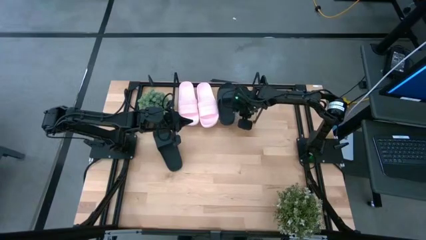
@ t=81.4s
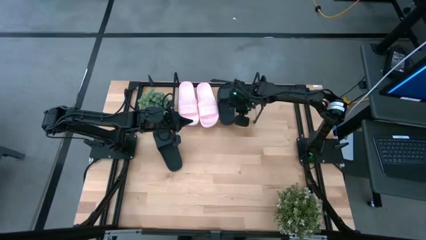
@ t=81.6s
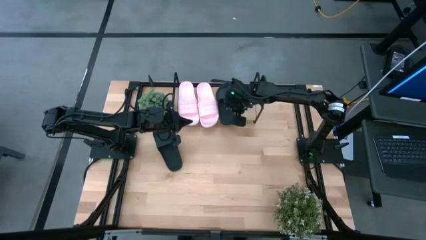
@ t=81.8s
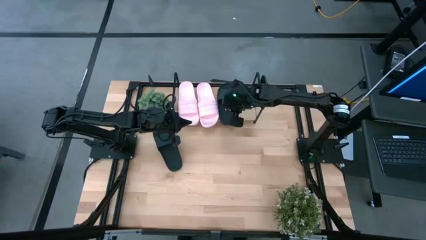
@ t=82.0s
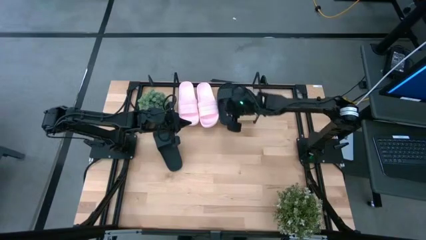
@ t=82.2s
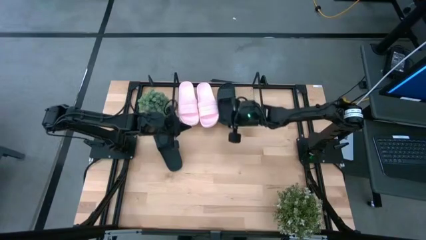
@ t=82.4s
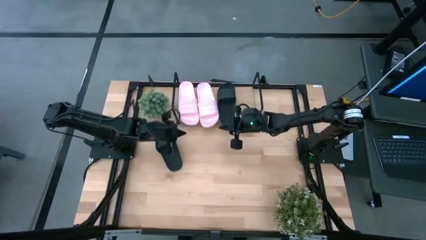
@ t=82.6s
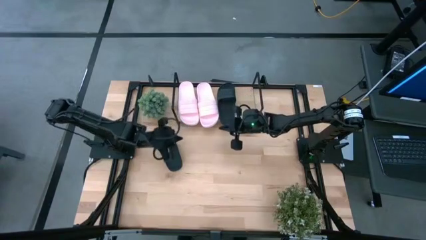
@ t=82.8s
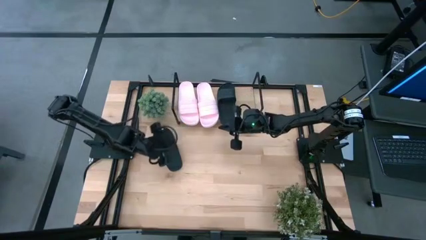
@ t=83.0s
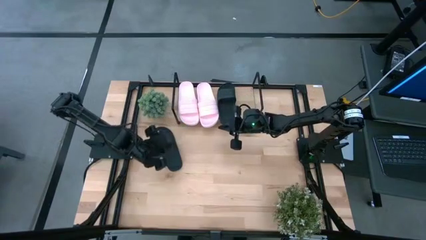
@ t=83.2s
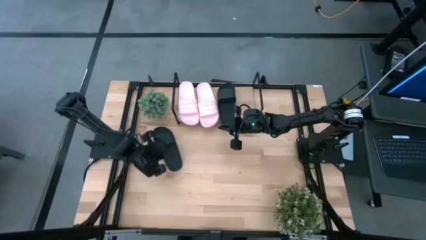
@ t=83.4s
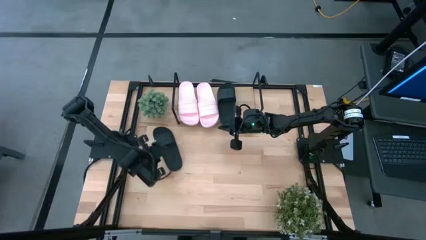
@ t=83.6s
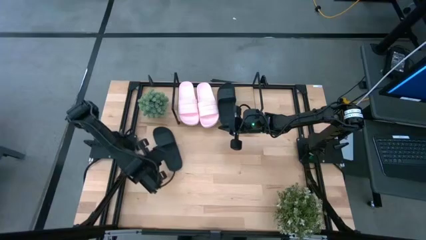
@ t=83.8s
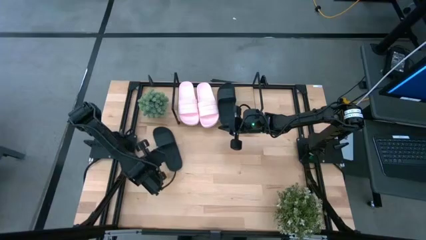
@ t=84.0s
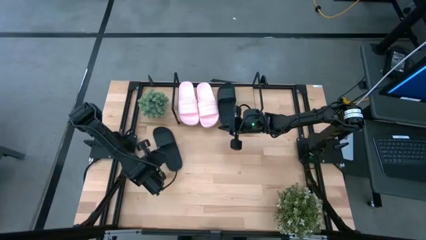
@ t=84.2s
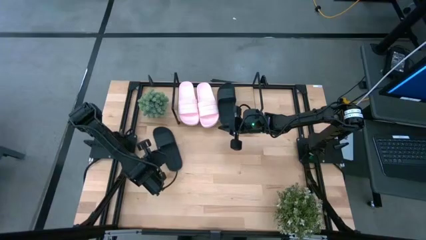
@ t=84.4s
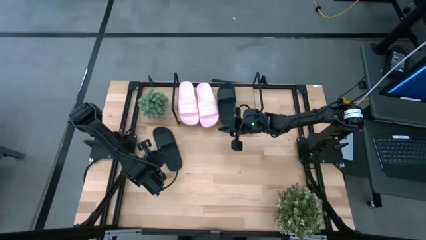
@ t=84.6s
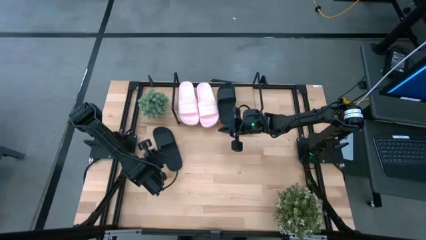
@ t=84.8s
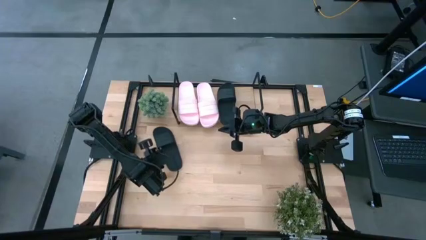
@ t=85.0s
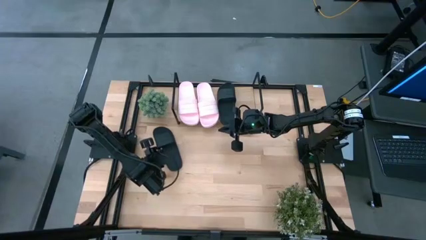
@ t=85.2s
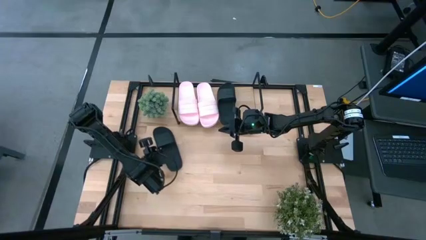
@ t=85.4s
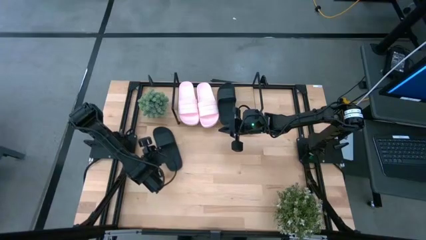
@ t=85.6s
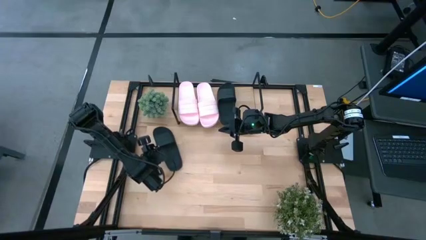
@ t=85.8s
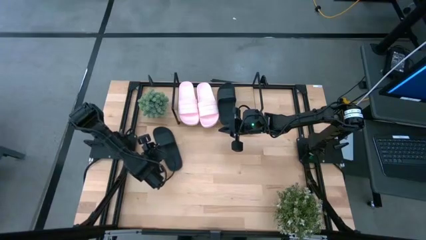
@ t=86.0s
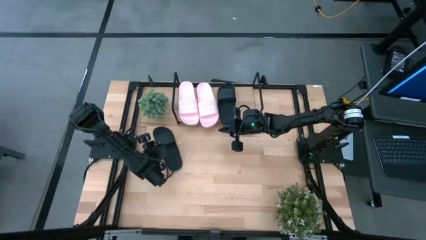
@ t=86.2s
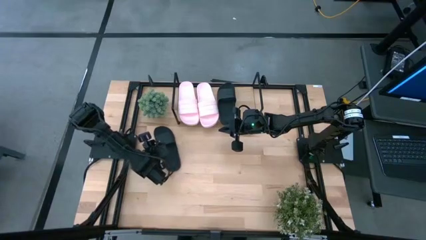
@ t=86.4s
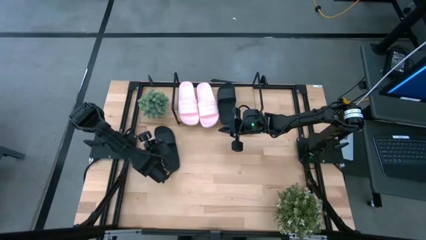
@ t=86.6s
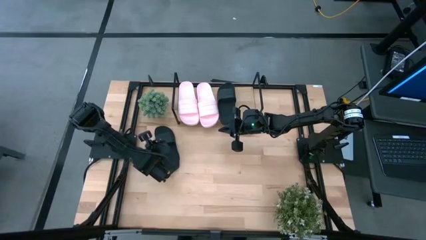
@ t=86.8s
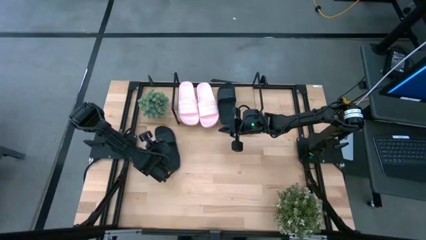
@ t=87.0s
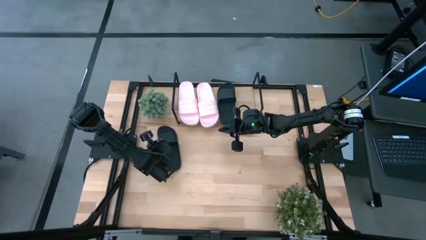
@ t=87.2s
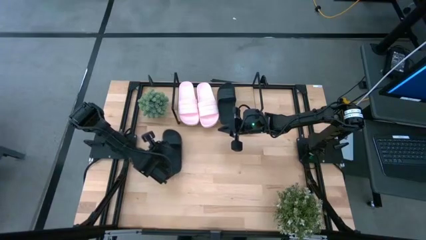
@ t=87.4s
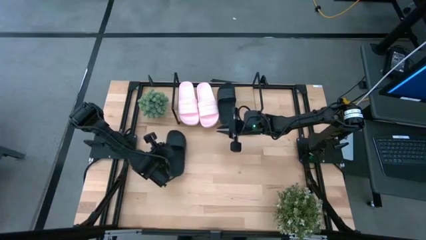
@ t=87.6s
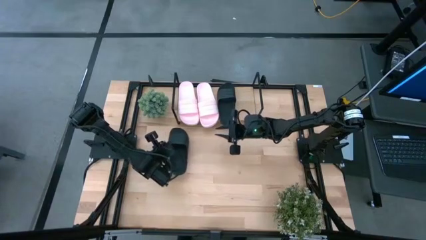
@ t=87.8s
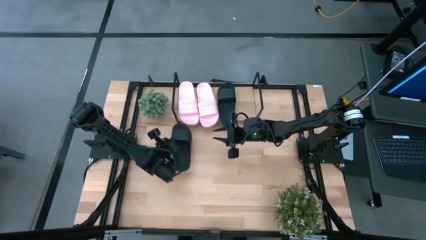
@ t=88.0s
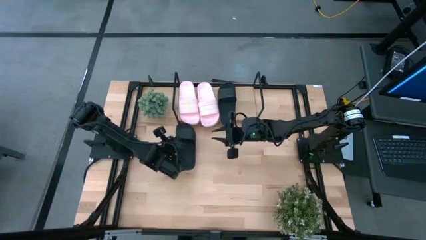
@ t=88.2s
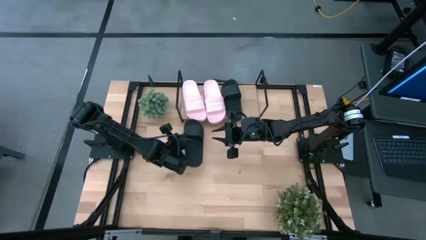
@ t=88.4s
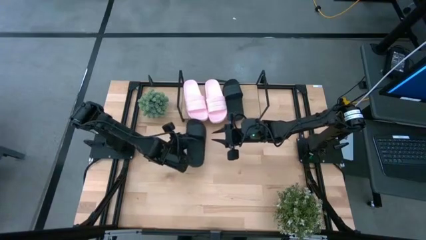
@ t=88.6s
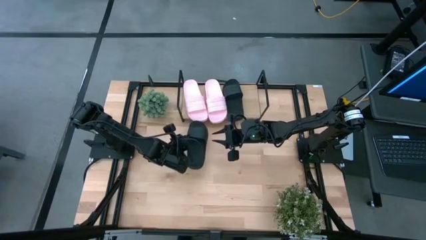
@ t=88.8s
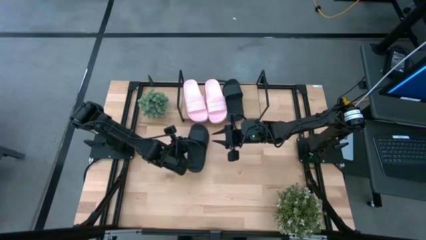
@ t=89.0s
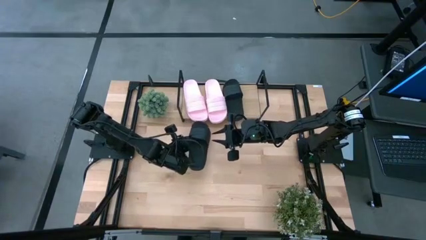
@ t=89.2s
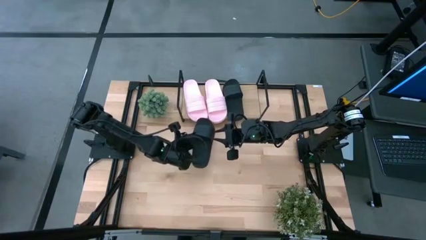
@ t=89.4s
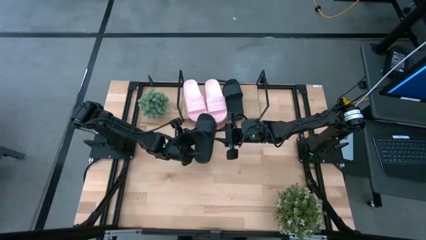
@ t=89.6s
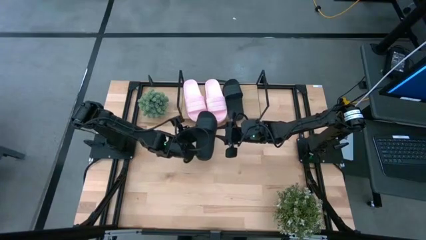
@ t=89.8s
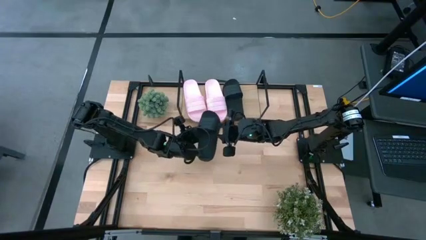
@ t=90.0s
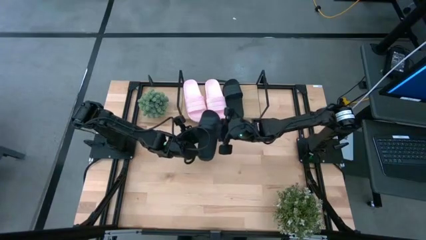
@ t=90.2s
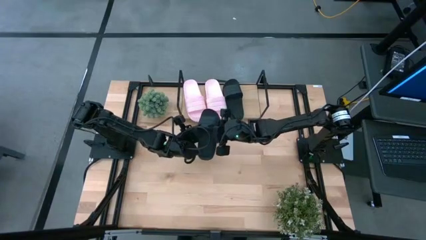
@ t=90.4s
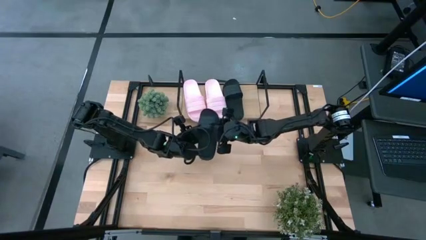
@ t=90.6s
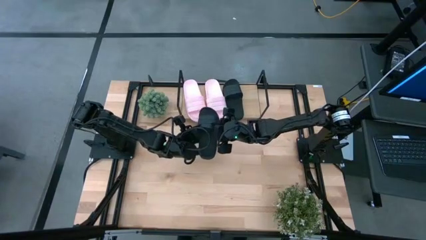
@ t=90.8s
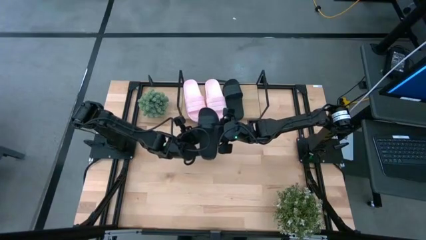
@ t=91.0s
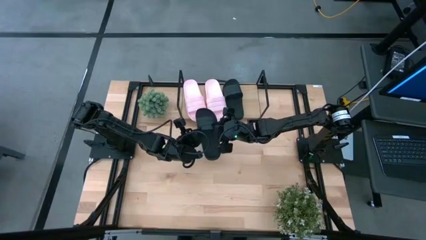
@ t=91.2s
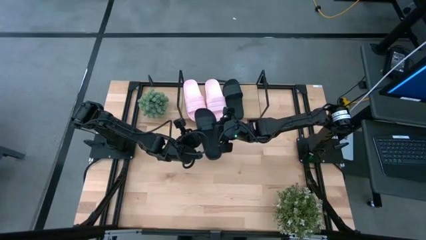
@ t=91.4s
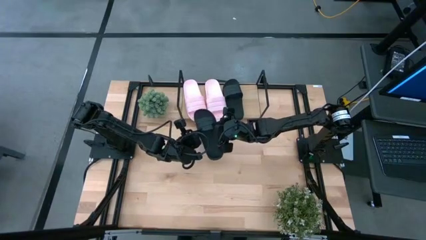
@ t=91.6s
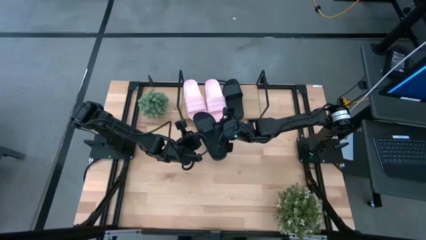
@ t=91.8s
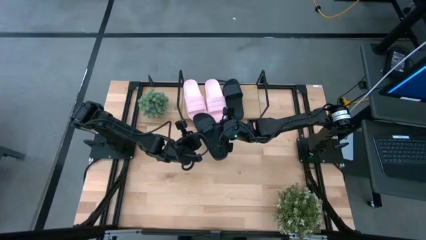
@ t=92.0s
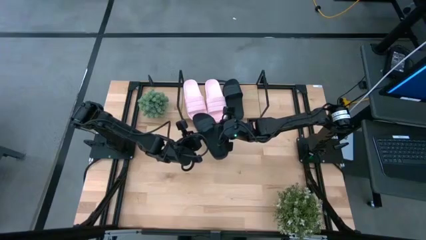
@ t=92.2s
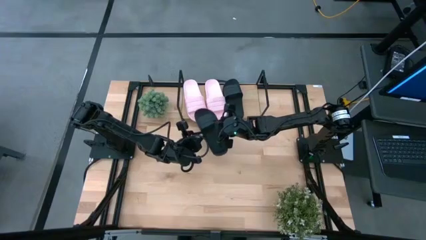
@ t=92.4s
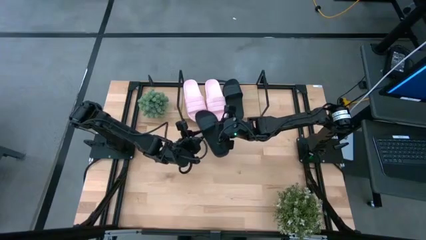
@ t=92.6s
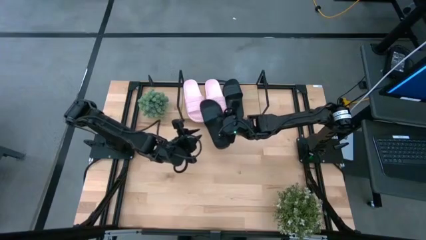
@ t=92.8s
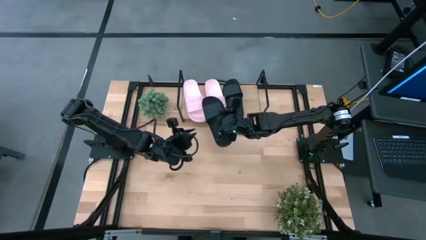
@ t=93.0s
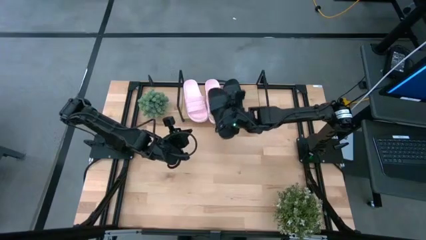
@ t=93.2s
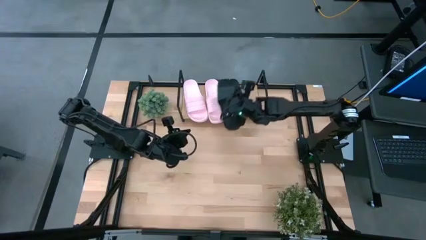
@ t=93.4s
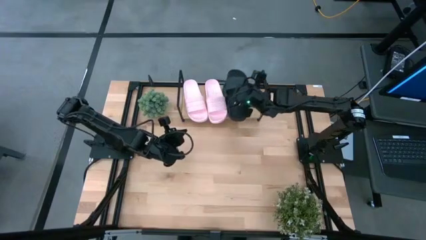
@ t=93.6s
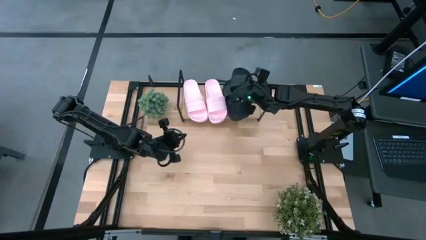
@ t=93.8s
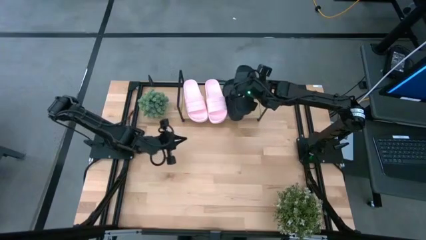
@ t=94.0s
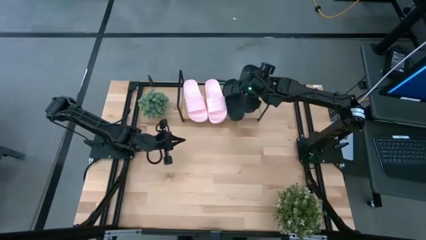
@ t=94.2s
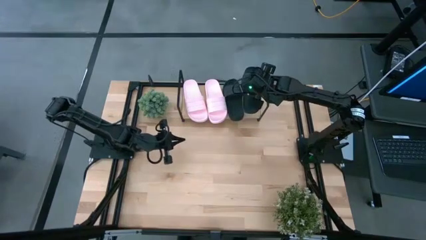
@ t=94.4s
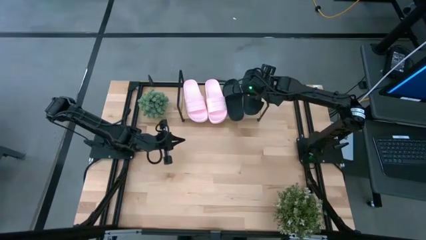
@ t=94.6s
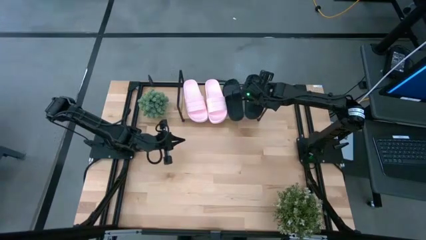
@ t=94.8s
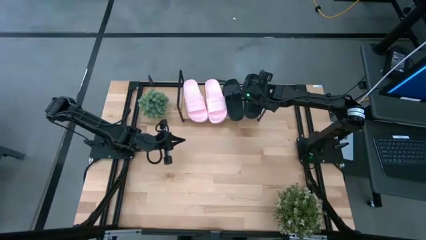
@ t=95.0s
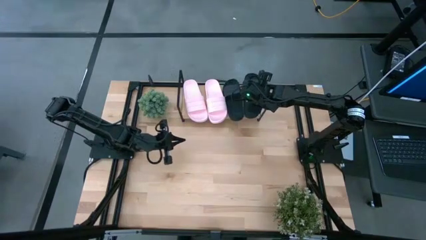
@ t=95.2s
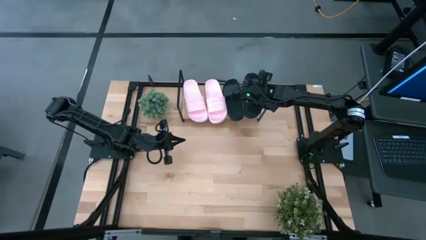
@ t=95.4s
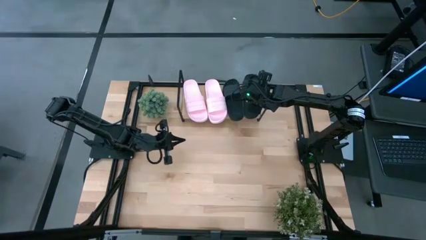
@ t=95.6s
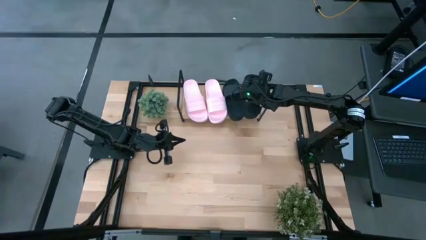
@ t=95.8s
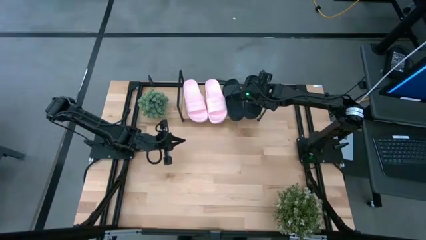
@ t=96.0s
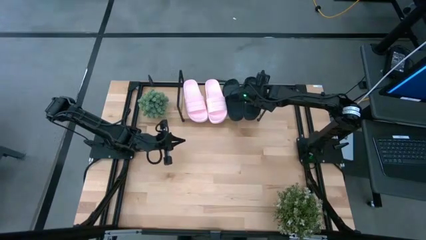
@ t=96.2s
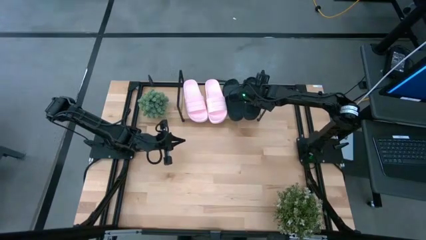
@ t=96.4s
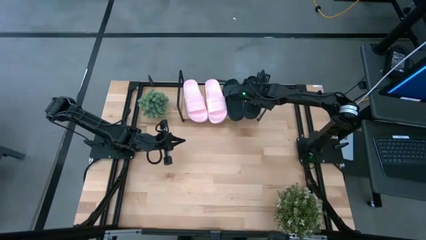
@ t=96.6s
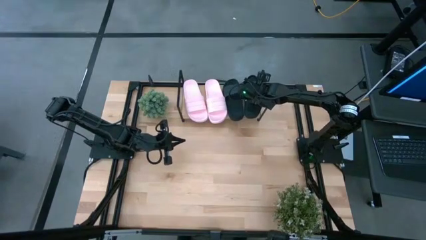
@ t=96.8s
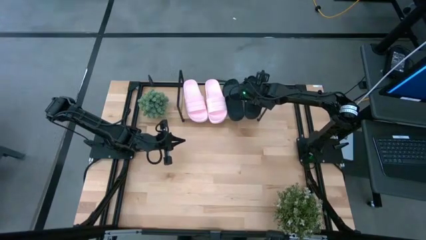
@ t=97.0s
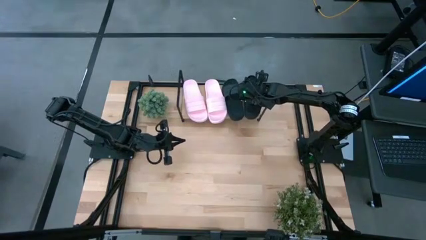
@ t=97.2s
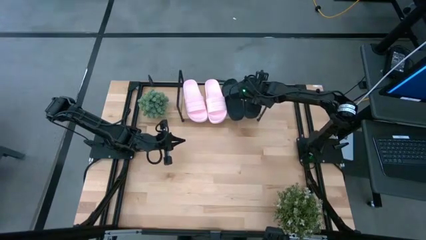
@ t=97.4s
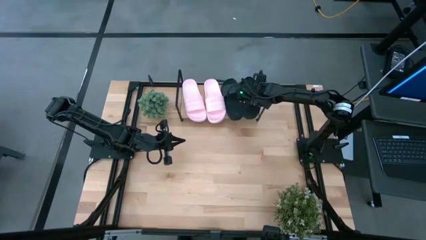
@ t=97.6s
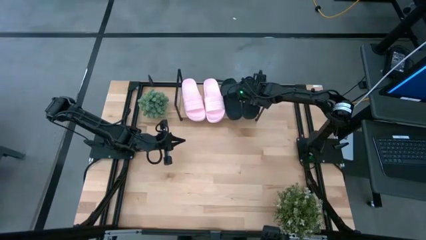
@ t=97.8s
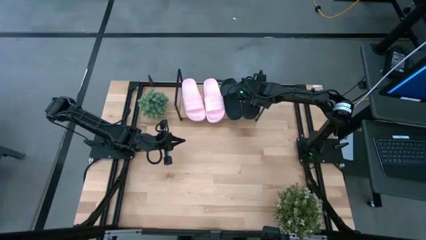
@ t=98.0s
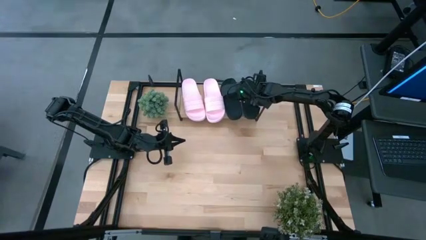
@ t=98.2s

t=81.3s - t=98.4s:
Task: Pick and place slides into the shelf
Put the black slides on the shelf

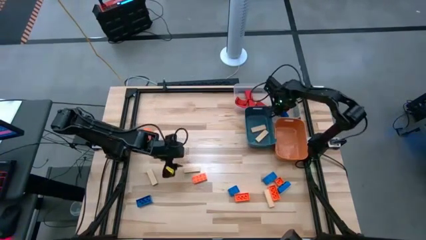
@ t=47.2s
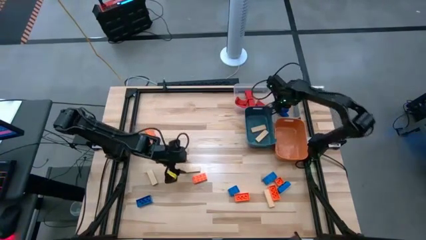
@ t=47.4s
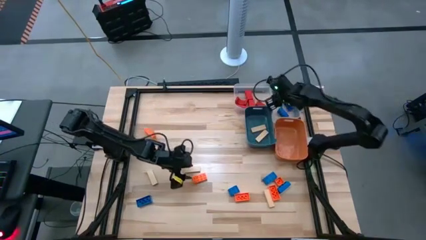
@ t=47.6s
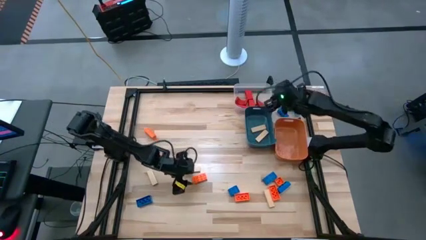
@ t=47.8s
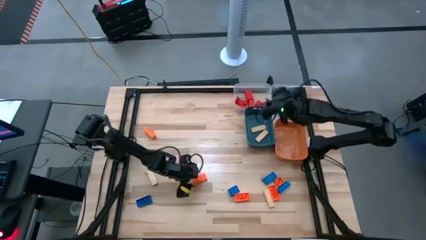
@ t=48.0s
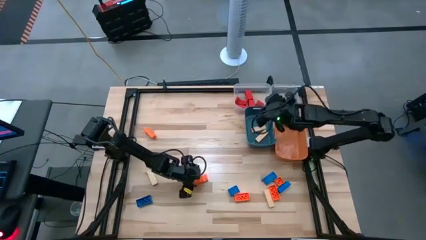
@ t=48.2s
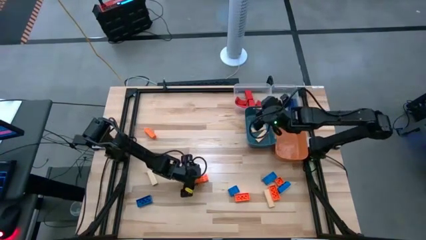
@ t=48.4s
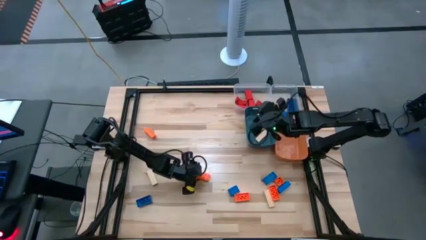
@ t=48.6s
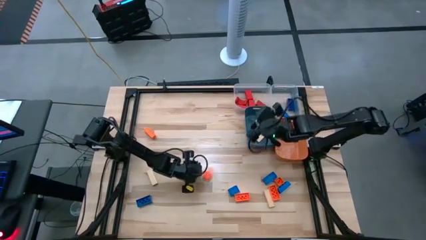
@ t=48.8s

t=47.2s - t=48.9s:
Task: Sort blocks
Put the 8 stud orange game piece into the orange bin
